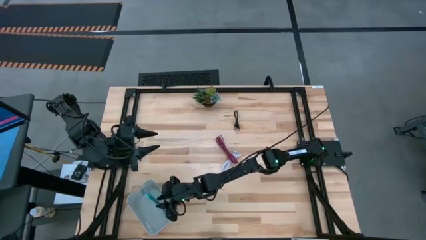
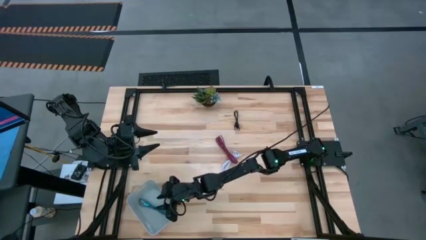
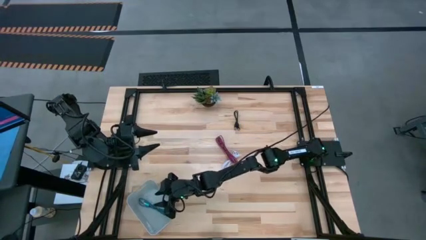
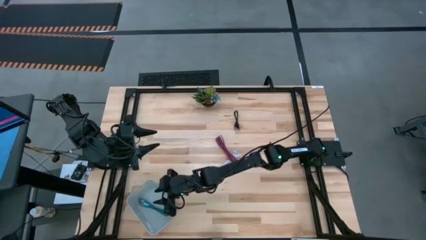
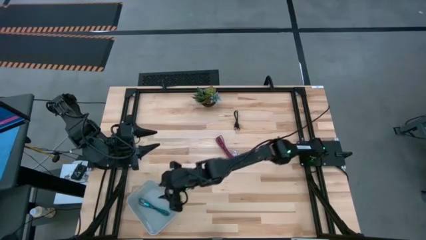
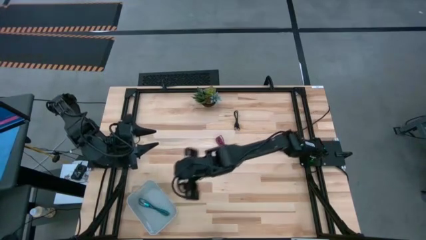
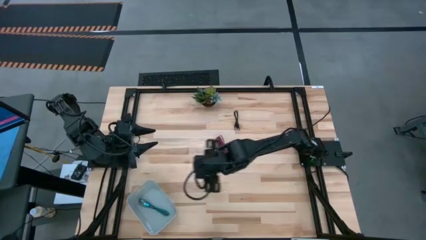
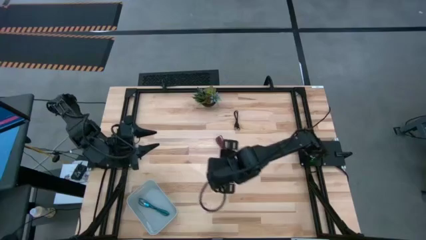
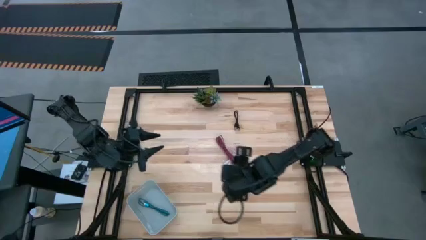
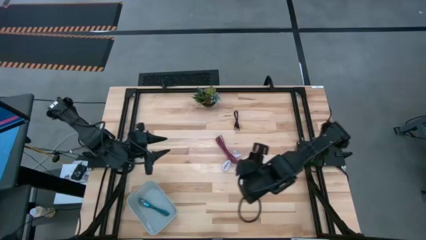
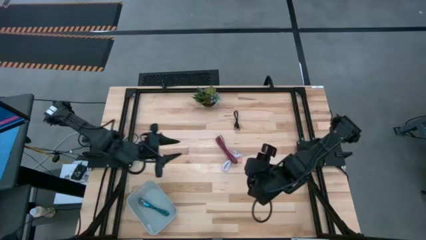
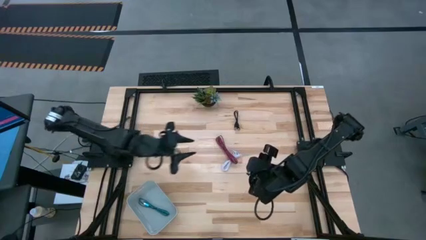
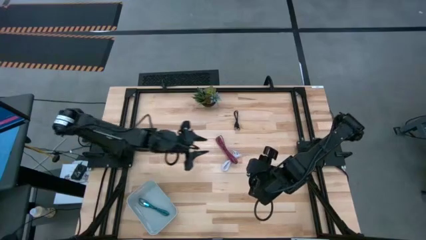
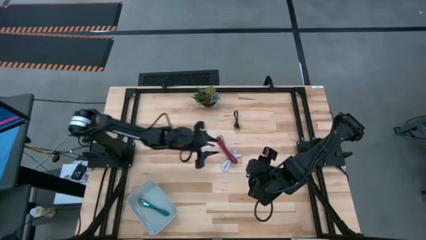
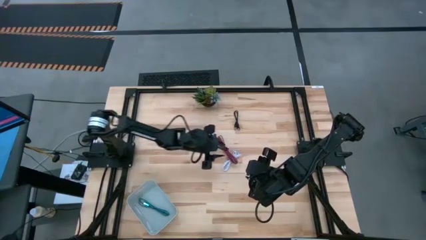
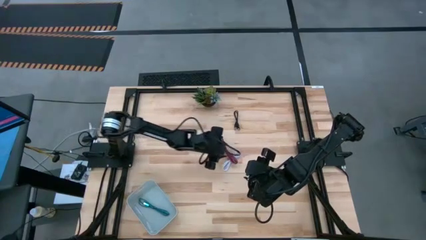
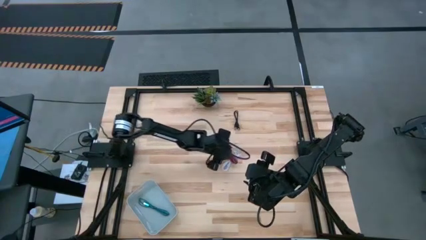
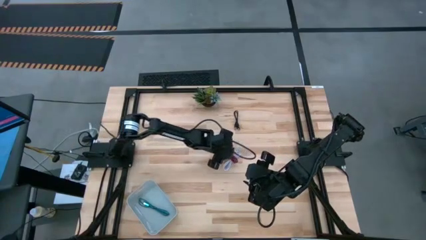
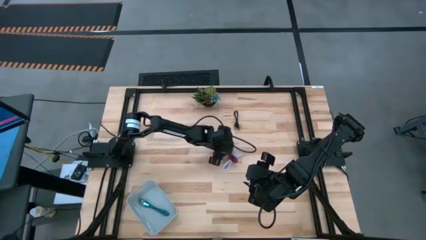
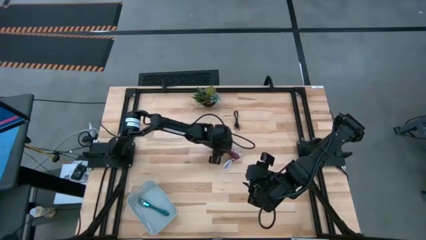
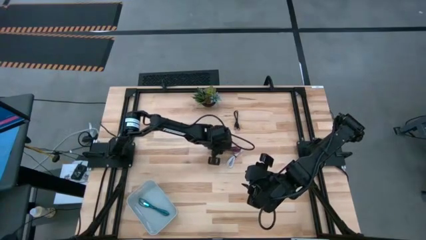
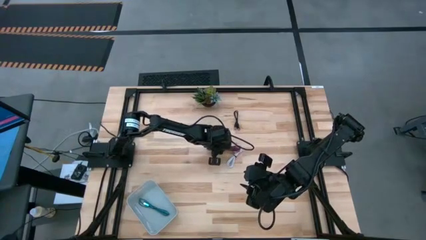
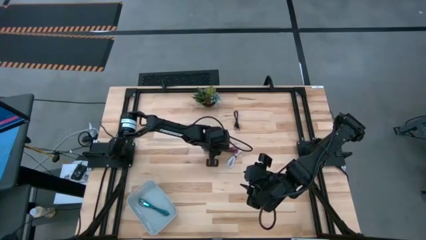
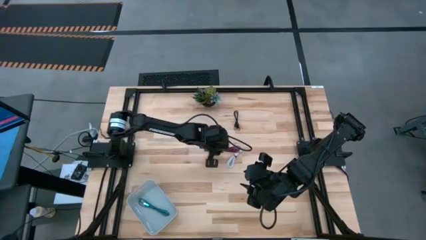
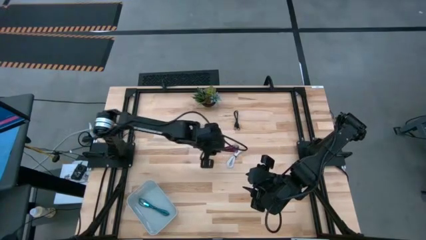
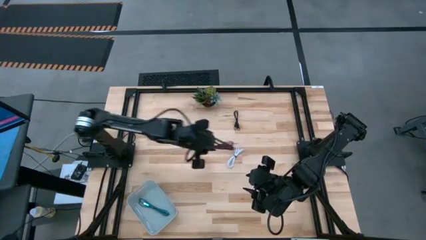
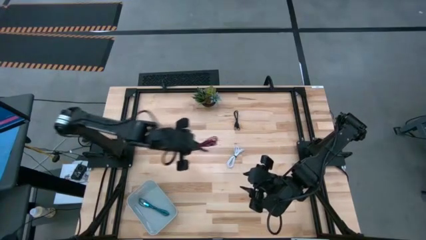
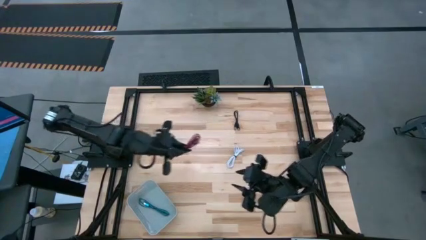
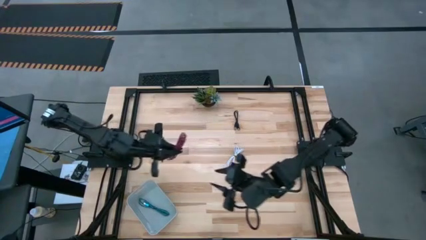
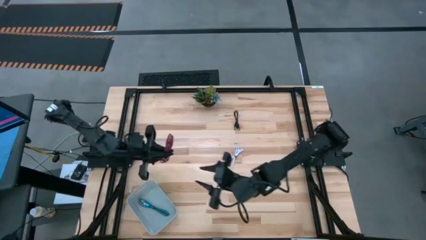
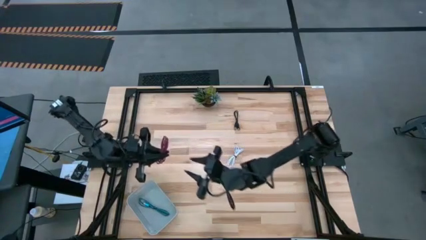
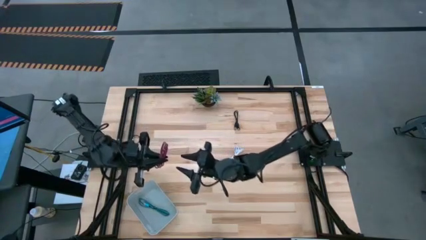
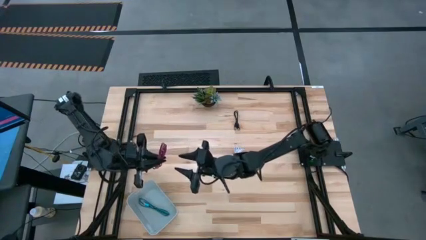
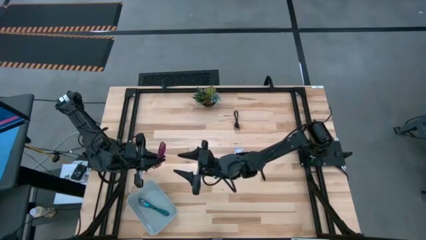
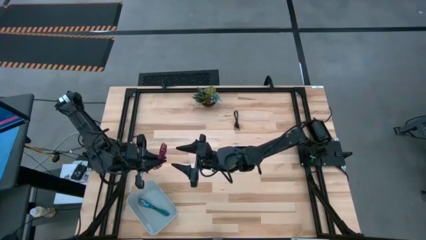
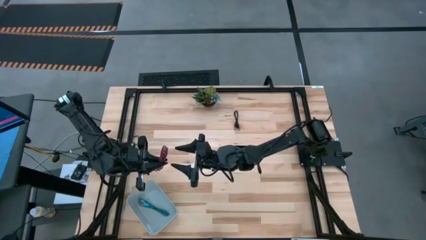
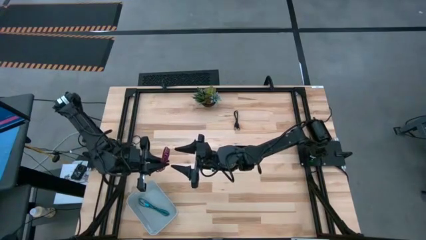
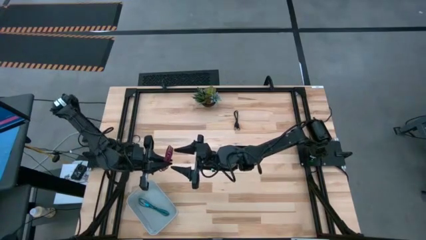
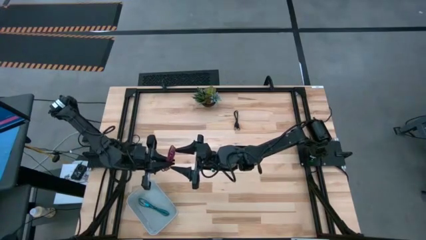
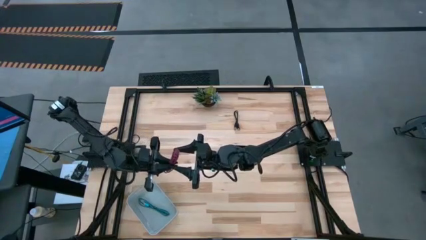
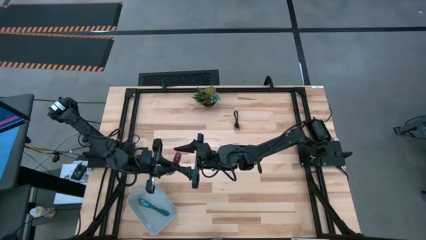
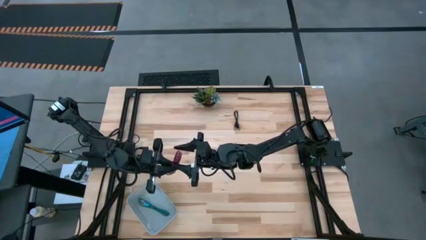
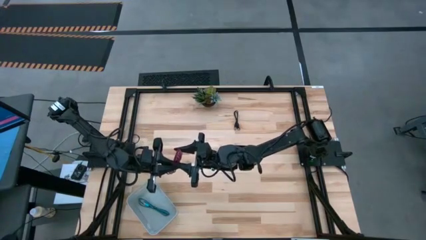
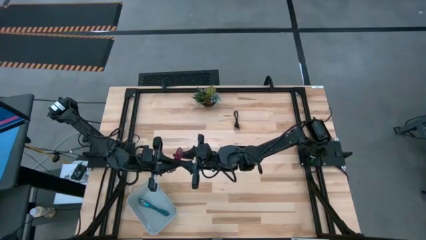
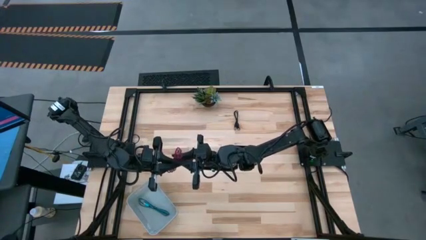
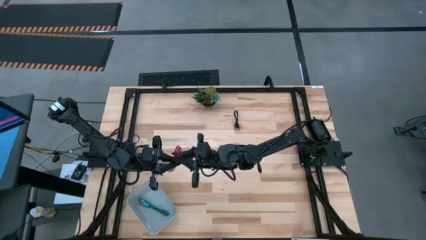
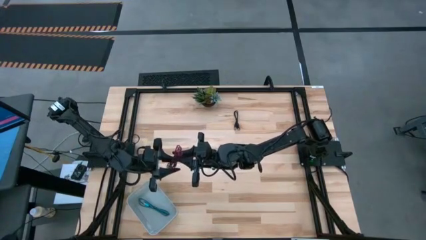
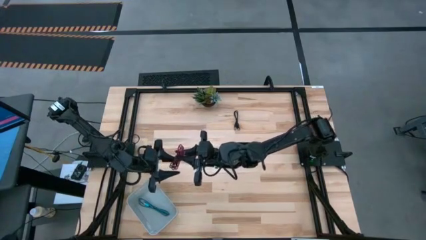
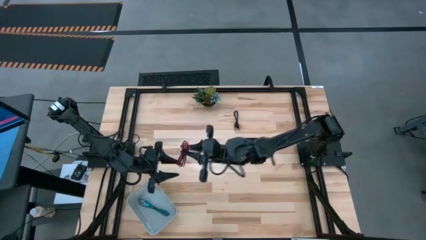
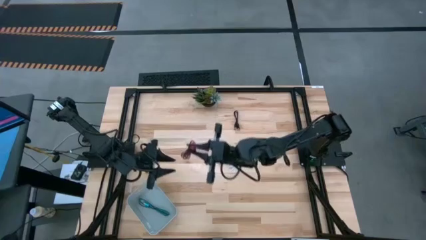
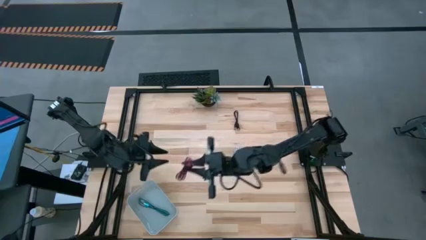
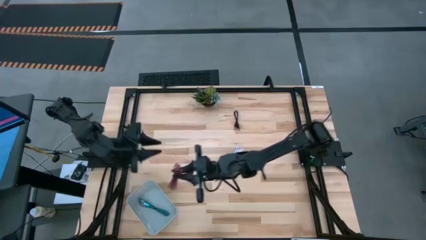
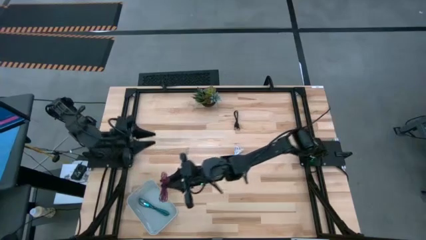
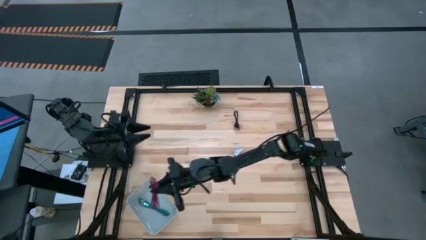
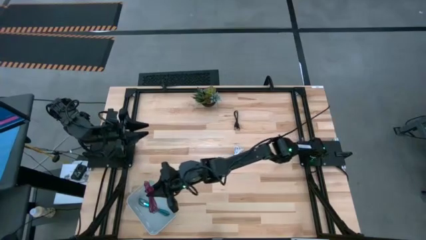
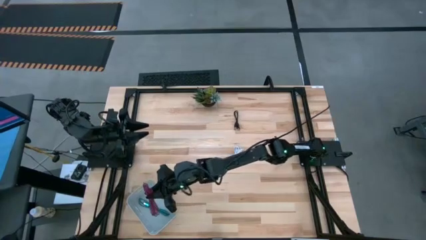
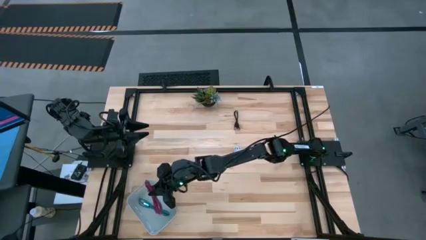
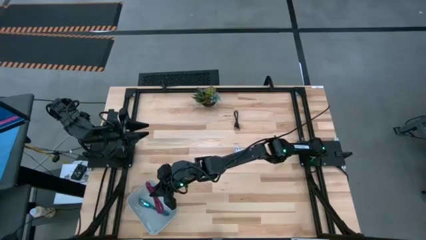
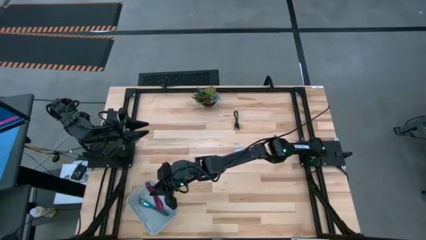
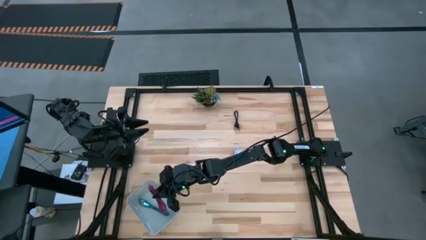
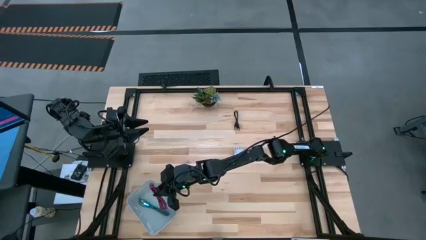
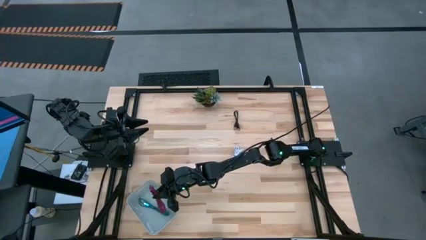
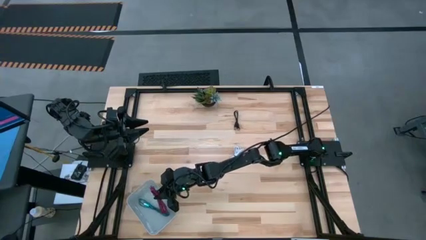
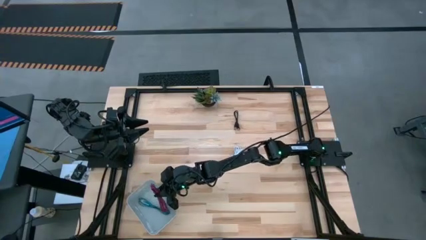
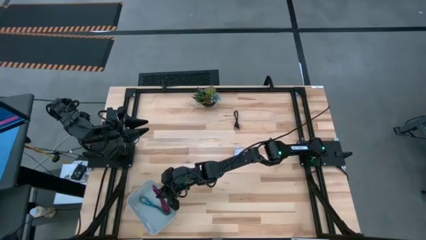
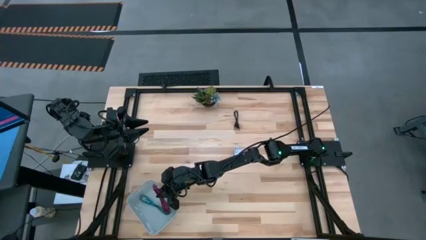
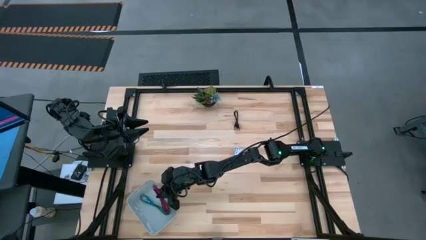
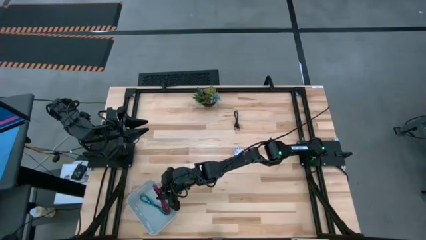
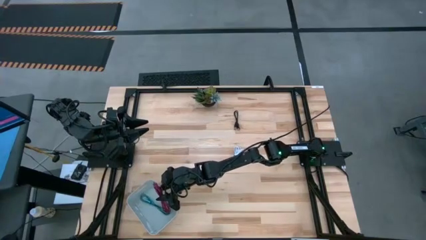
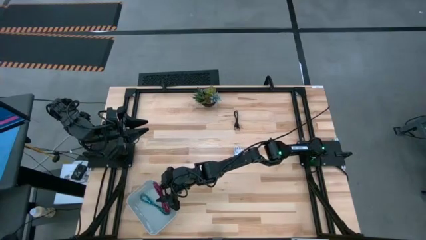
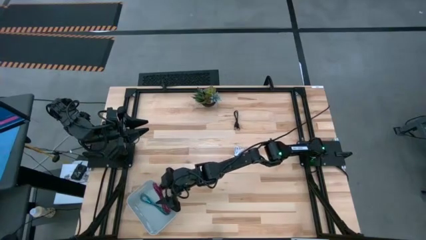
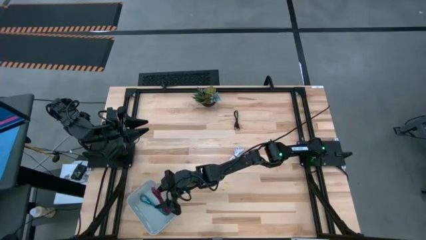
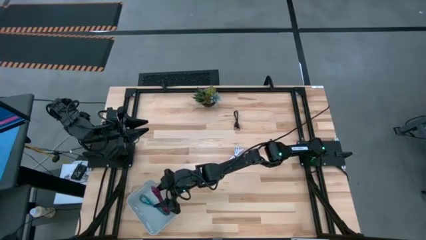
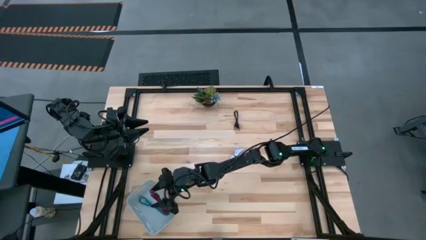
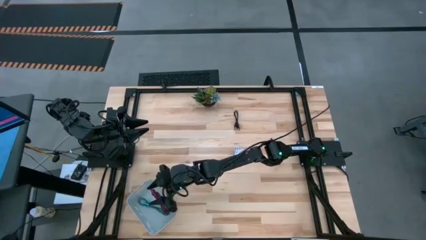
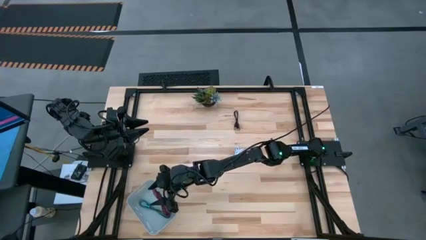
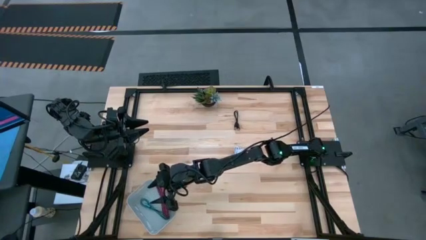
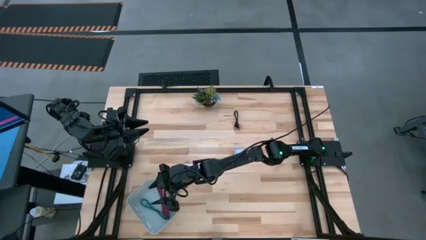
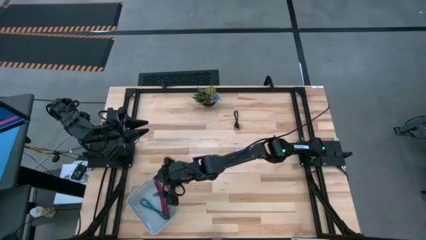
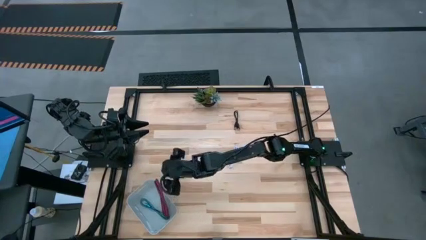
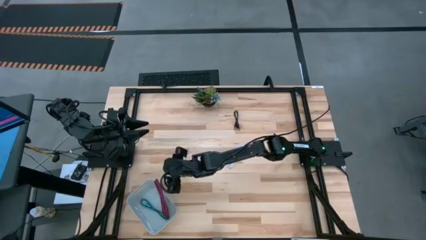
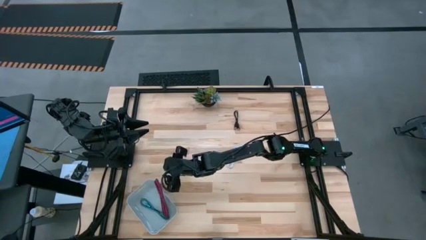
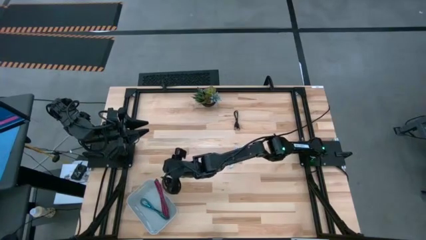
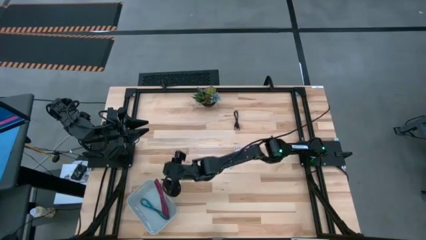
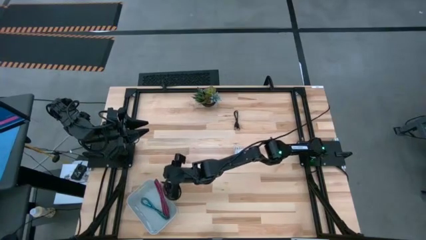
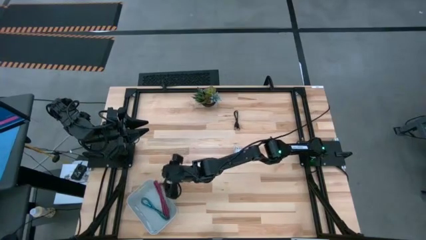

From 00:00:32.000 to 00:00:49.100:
Task: Pick and place USB-C Cables
Put the pink charger cable into the gray bin
